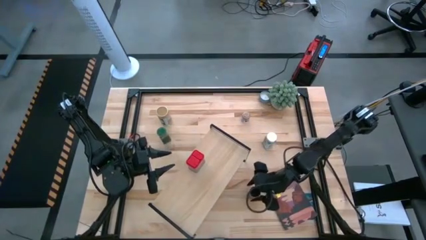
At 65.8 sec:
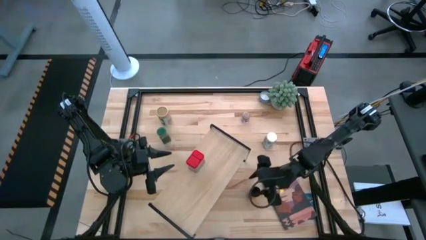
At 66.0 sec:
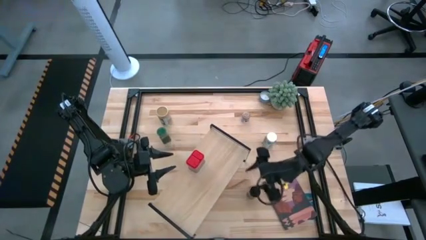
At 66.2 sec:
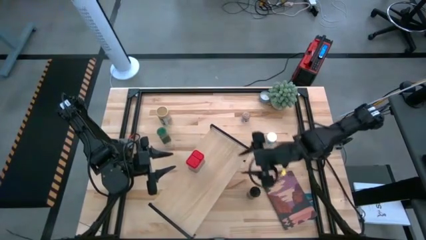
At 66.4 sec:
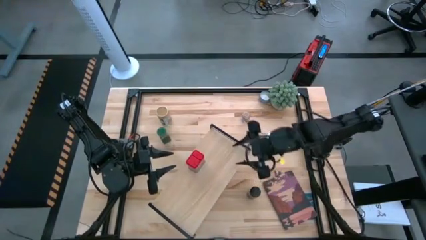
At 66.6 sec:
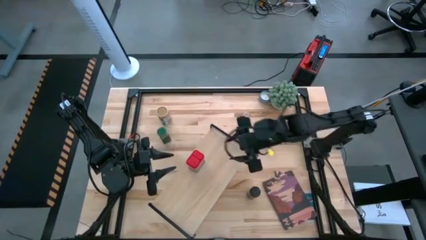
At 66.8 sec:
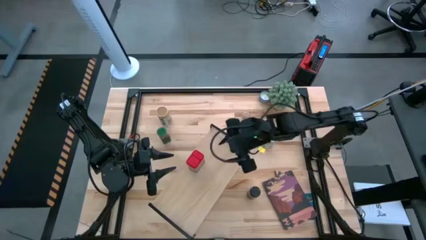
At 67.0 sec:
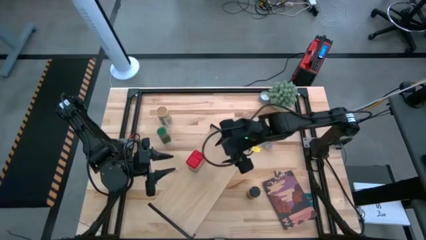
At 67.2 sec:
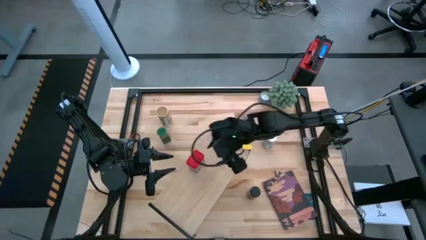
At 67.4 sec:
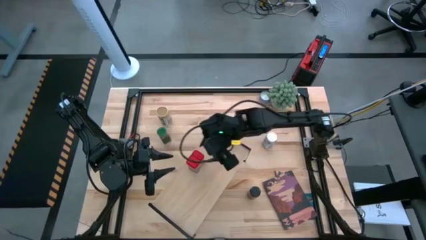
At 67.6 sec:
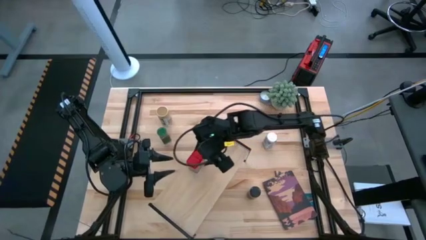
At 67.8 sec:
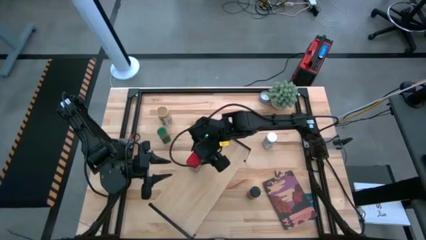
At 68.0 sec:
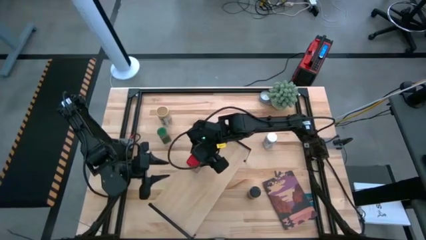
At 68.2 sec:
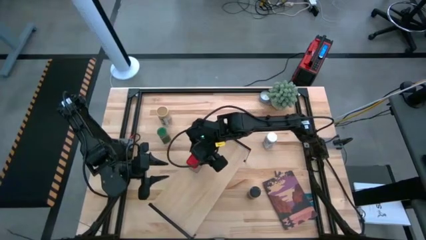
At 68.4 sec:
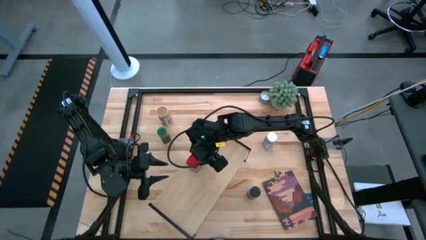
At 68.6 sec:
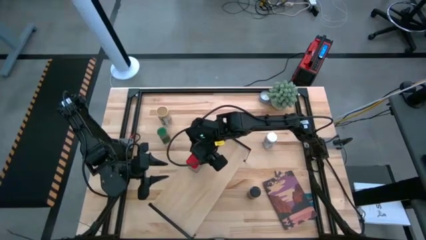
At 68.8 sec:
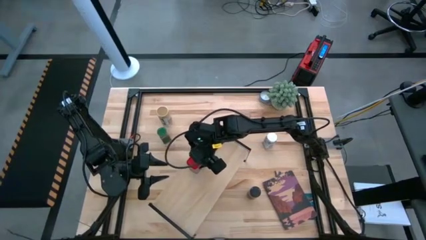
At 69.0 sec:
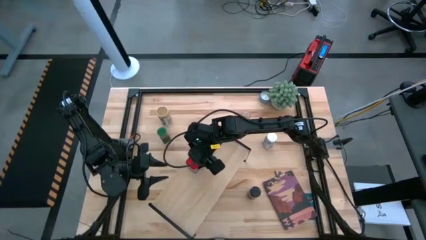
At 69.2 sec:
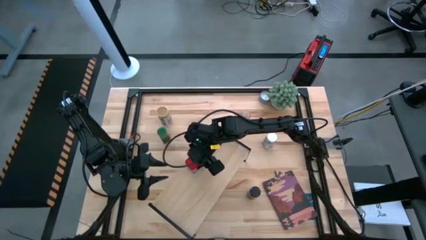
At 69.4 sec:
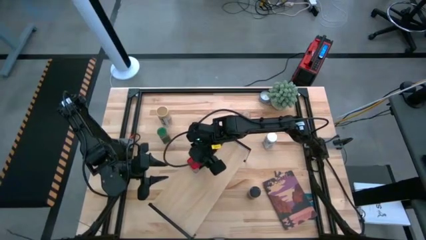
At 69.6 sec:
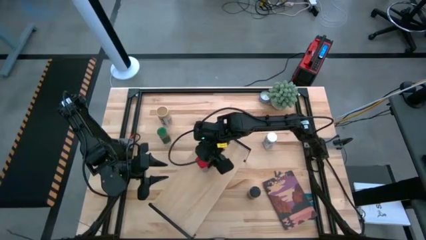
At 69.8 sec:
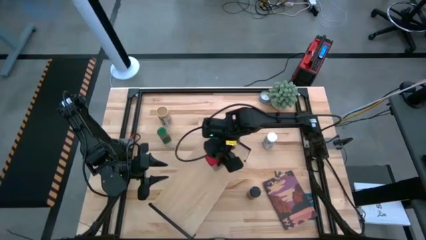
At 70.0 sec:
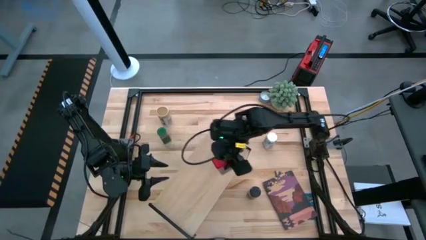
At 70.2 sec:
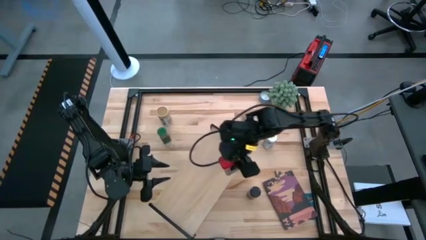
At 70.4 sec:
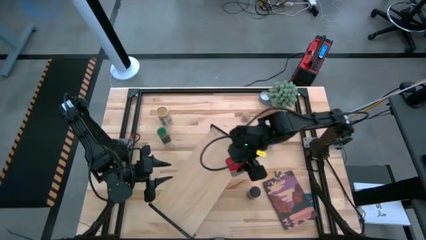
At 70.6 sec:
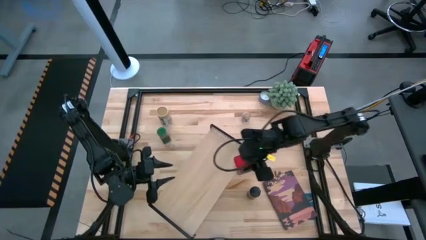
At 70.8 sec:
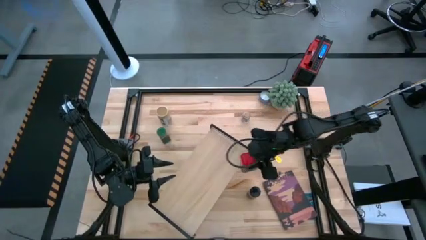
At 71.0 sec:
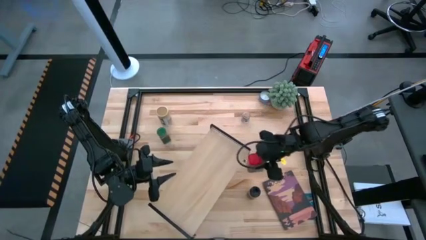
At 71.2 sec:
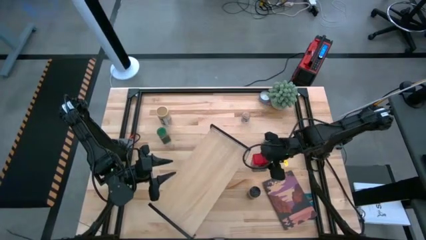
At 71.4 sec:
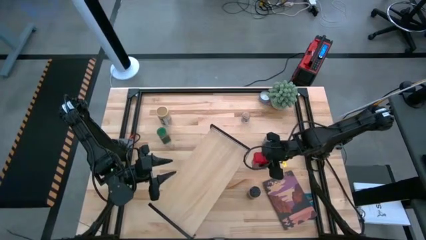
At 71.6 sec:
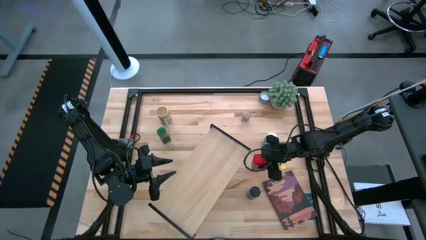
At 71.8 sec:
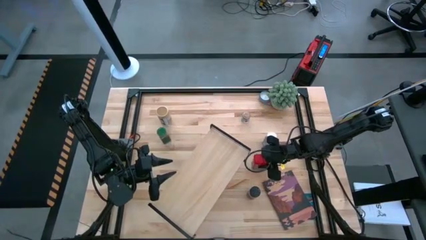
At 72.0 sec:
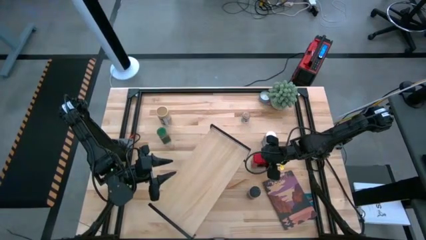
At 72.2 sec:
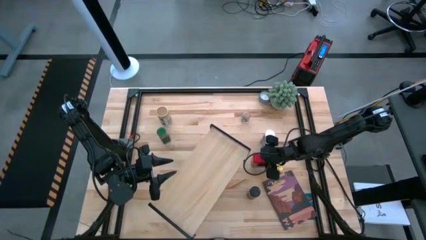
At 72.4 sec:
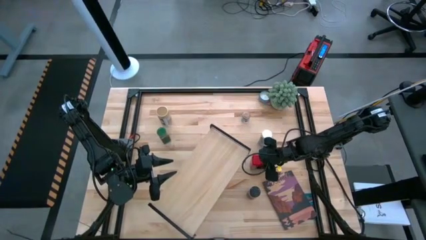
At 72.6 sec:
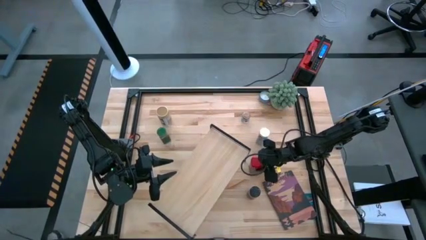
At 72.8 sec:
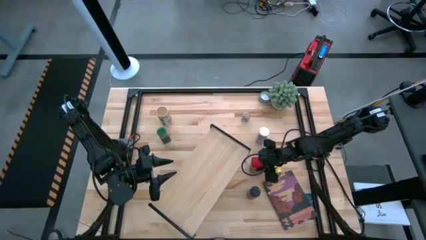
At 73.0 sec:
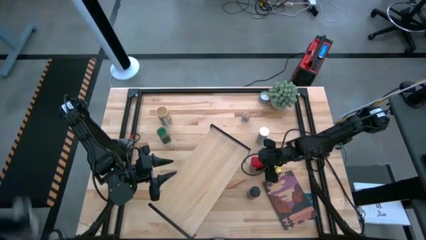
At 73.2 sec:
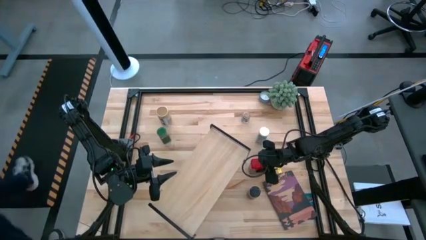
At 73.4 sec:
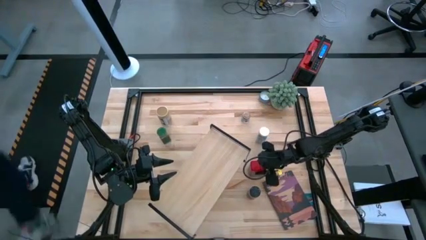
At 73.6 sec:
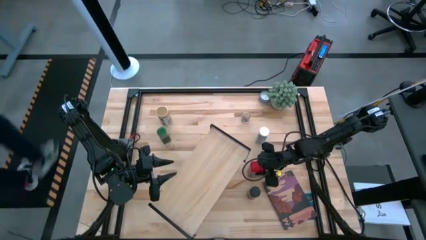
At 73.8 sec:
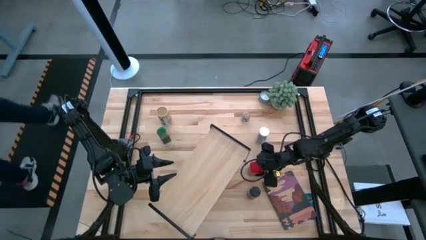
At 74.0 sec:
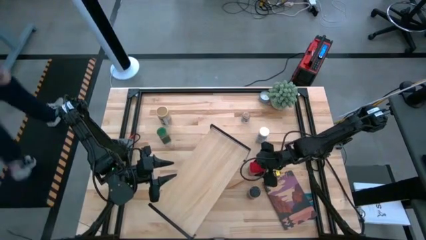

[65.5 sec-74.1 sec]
Task: Shelf spices
Remove the red seasoning can from the shelf

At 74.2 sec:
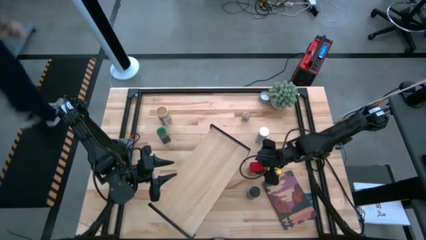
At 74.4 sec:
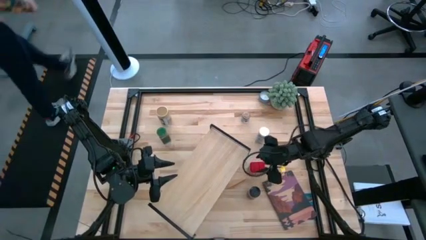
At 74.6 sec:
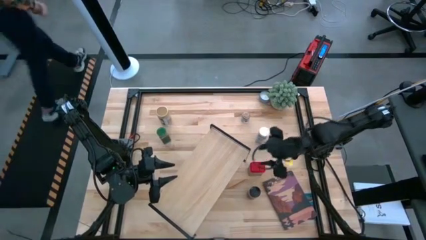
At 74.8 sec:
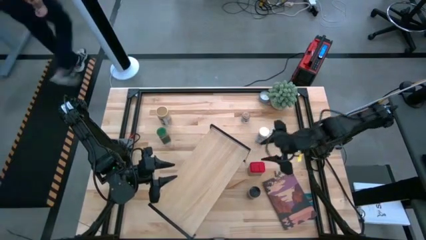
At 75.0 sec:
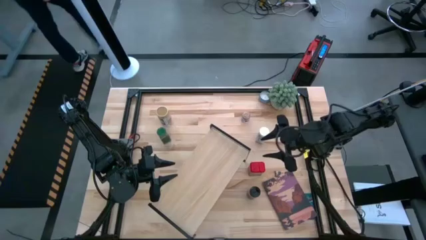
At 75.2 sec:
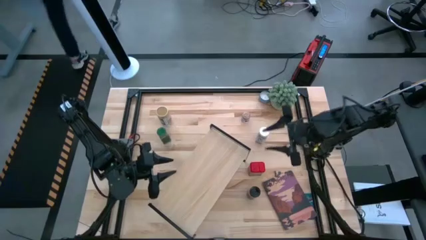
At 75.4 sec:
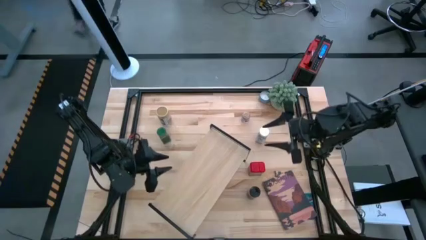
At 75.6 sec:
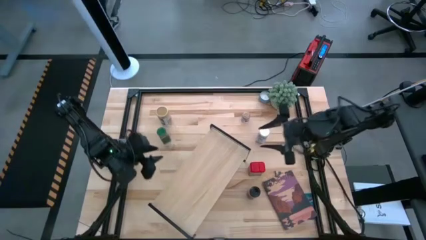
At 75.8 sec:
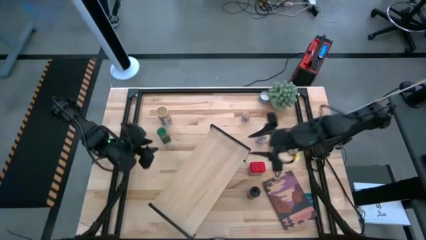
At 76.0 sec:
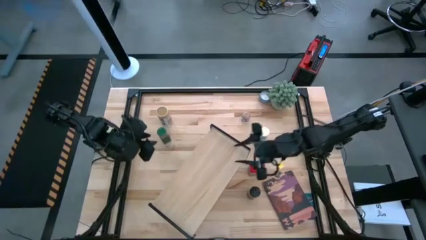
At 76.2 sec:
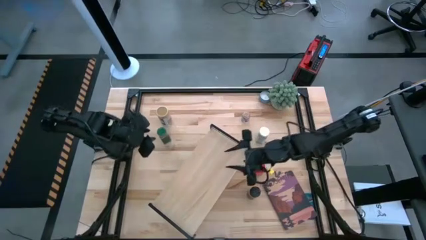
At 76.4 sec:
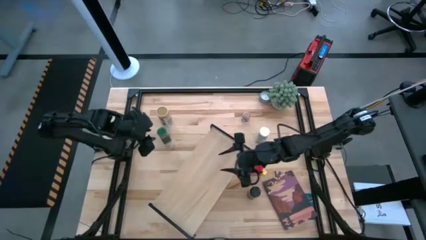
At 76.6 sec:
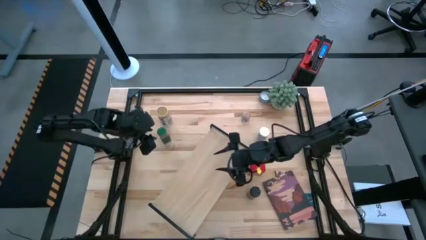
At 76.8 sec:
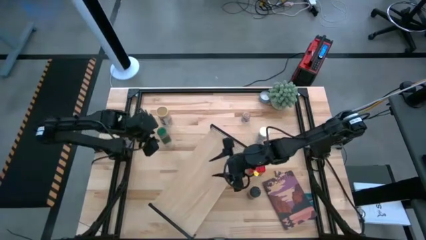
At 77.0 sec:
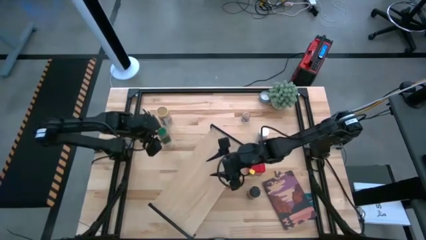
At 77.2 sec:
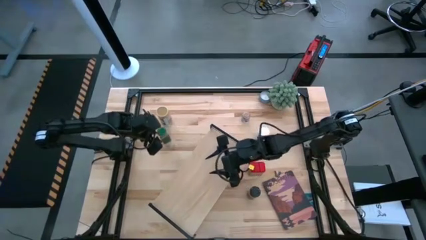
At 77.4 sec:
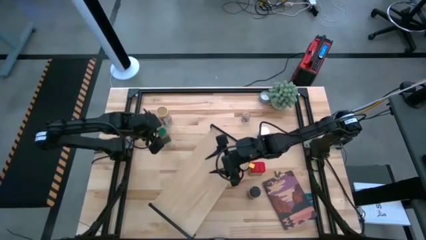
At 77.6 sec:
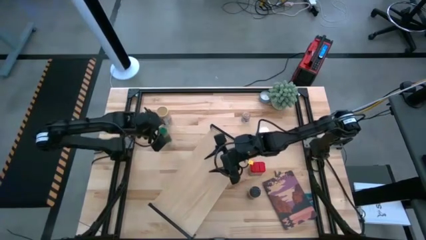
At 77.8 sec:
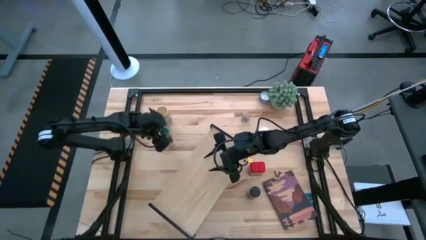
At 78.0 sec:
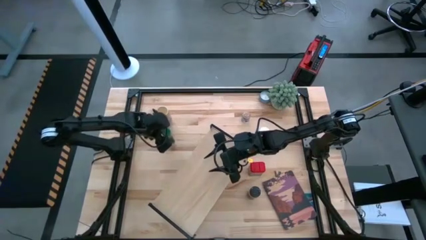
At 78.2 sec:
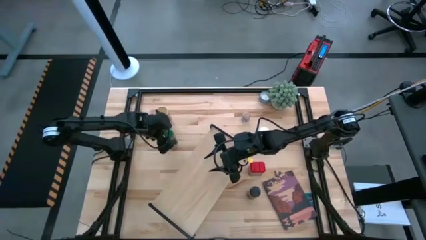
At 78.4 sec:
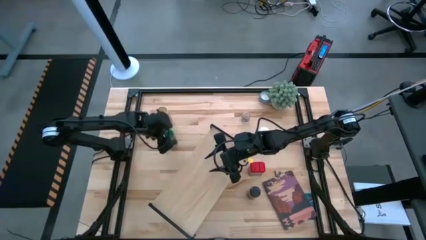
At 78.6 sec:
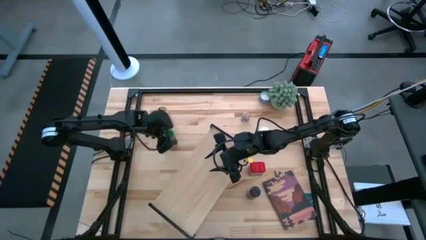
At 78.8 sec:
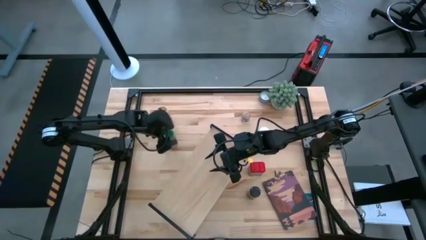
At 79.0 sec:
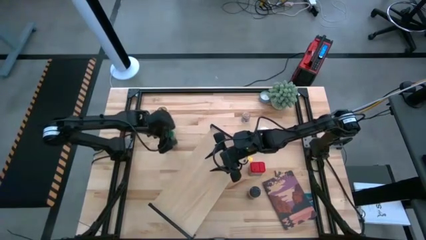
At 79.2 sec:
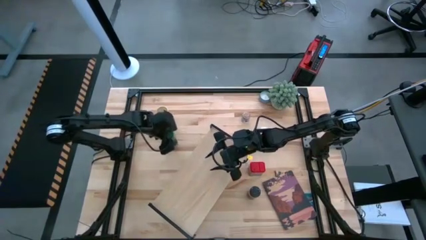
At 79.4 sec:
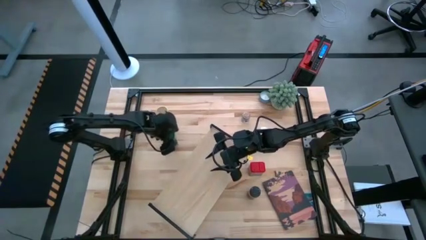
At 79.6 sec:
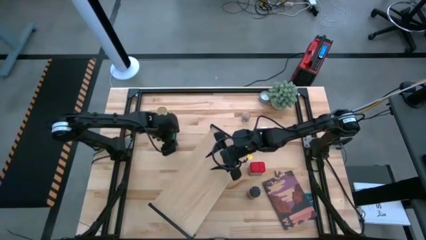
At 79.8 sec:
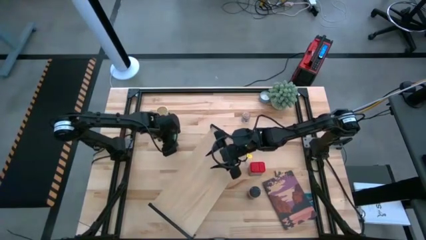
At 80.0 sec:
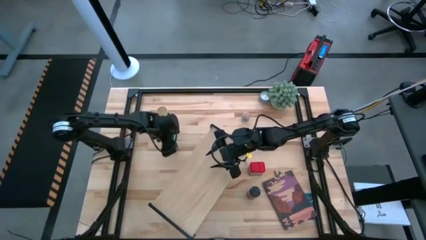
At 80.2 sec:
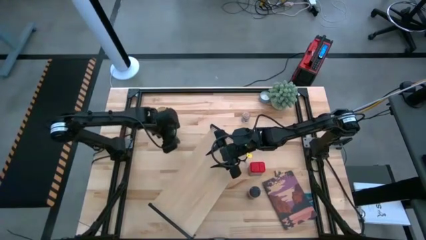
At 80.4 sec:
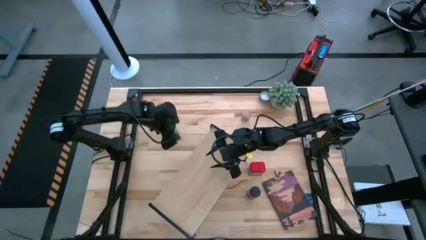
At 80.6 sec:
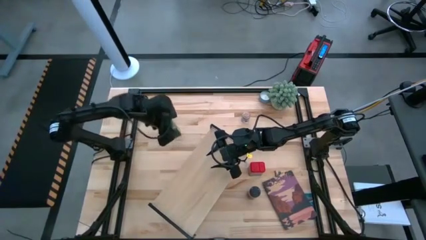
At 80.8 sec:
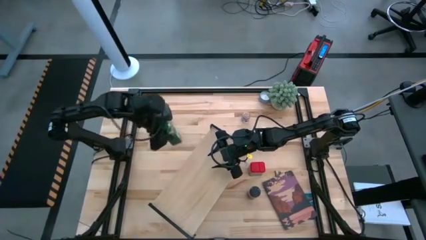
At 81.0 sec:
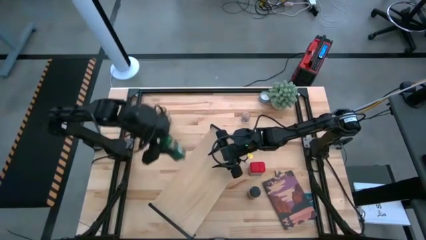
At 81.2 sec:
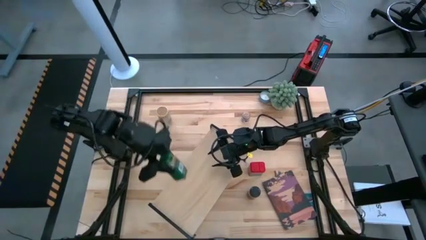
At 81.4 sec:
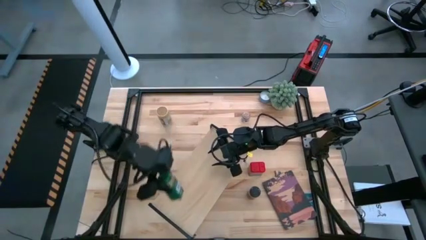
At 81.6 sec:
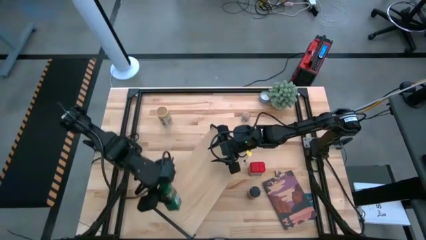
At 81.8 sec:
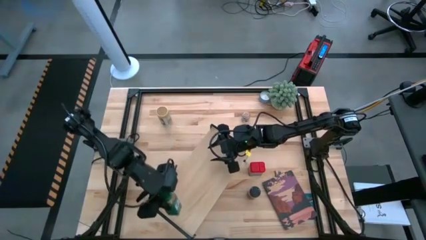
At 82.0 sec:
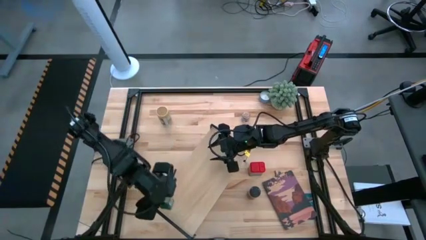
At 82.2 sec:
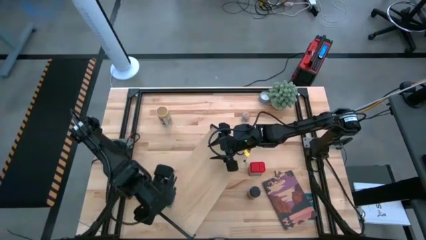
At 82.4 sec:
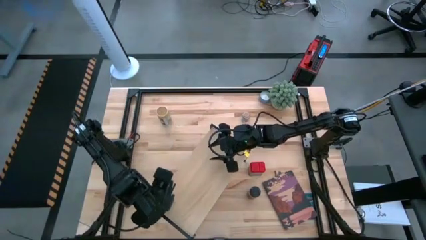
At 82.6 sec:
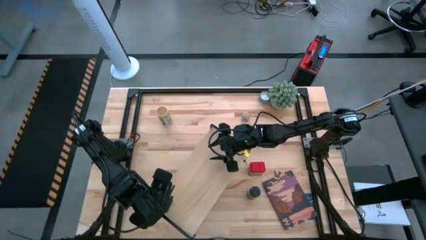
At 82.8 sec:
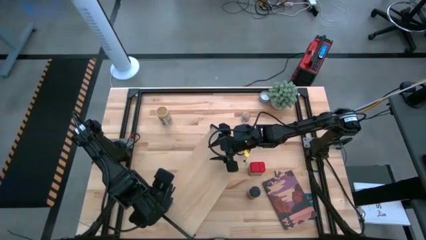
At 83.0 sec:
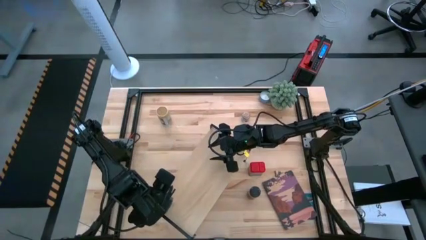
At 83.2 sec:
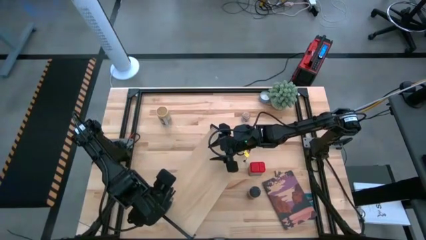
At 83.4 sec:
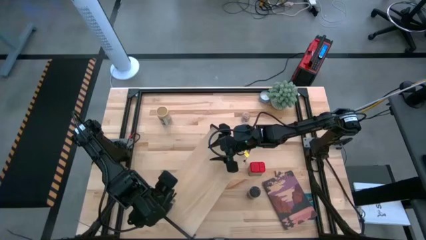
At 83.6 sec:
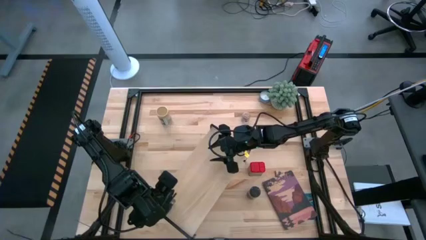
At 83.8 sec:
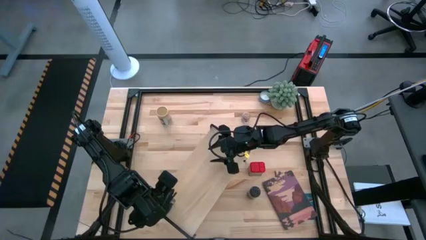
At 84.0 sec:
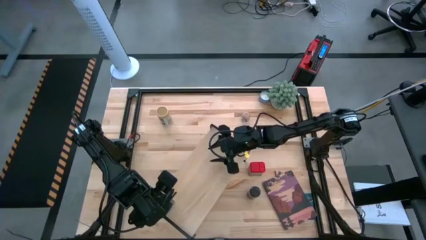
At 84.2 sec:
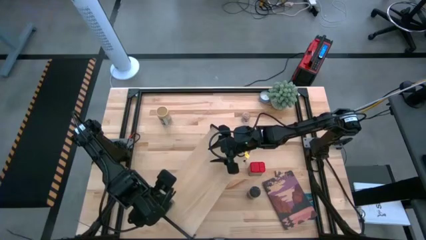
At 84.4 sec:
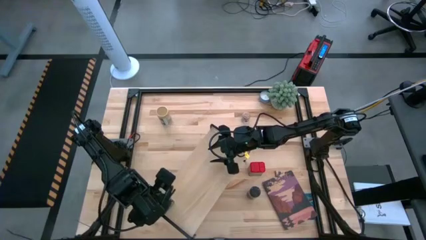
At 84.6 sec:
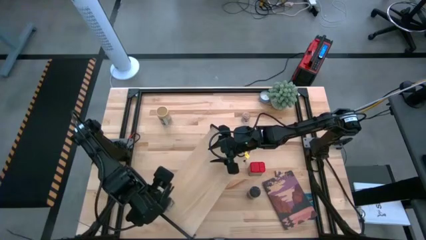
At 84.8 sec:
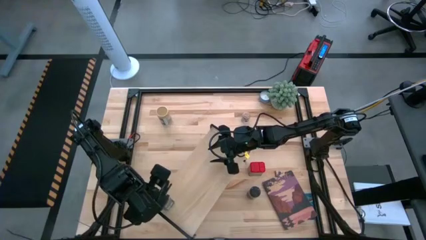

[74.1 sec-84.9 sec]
Put the green seasoning bottle on the shelf
